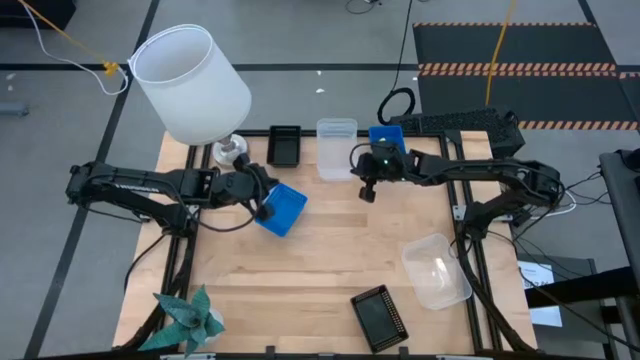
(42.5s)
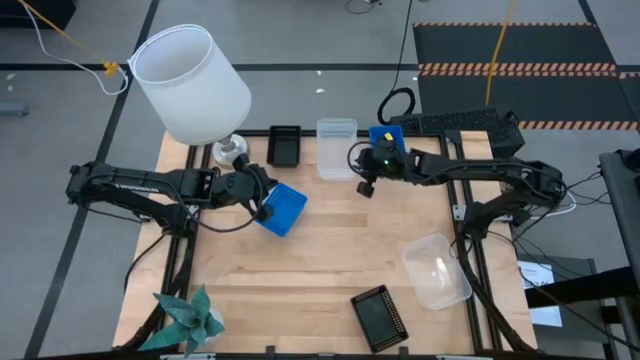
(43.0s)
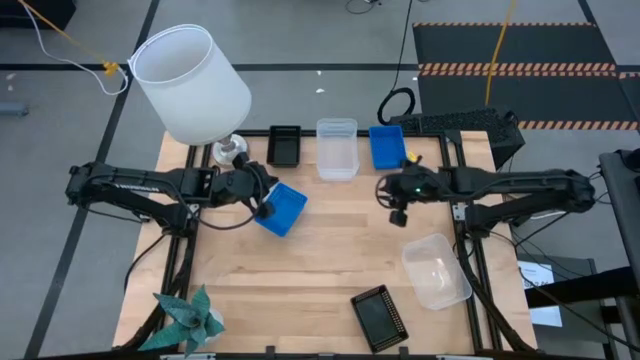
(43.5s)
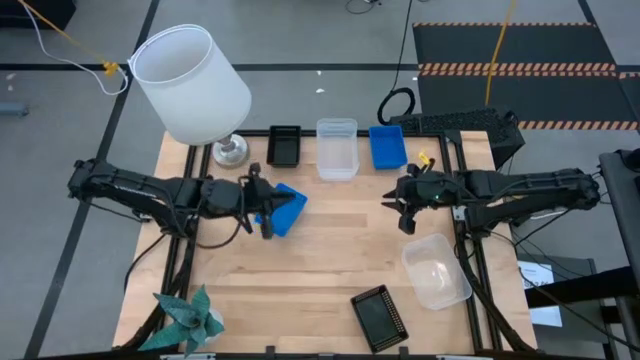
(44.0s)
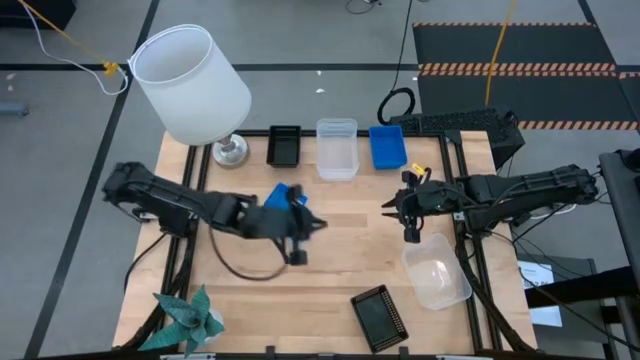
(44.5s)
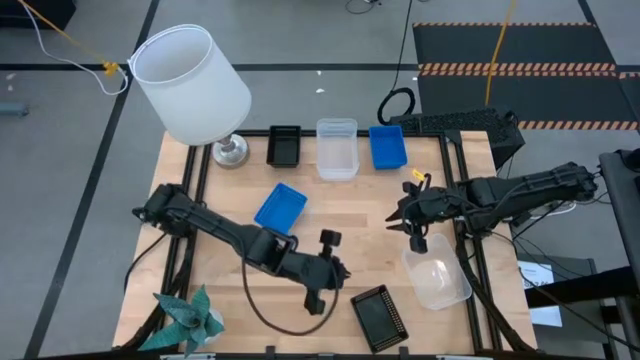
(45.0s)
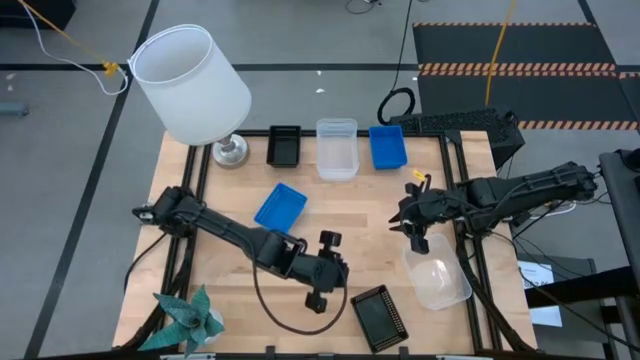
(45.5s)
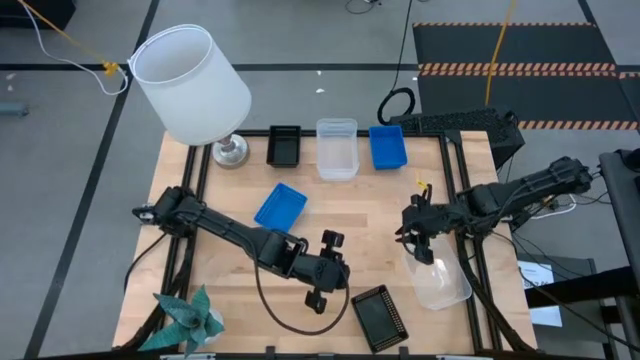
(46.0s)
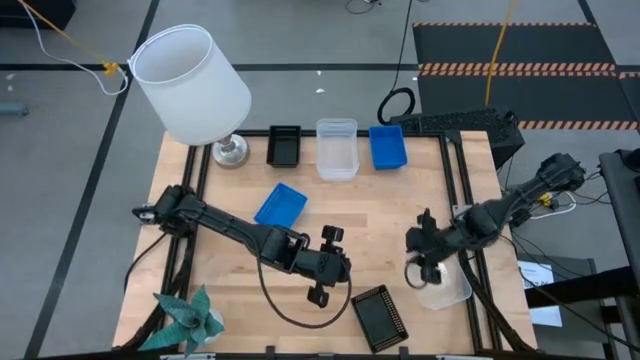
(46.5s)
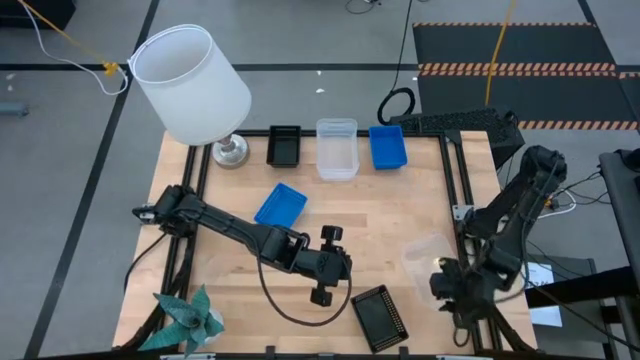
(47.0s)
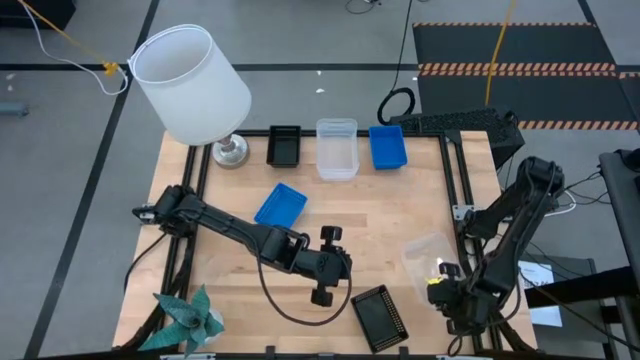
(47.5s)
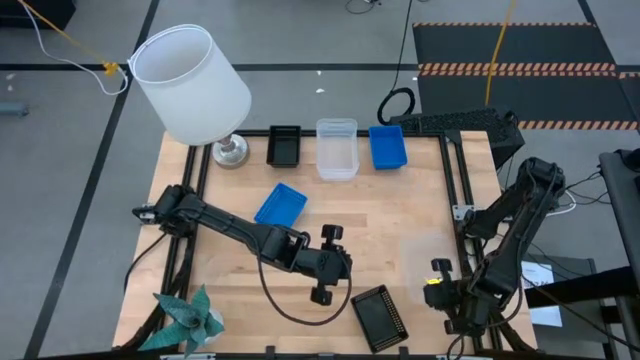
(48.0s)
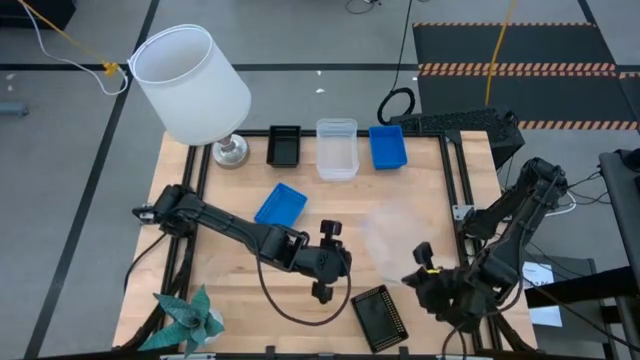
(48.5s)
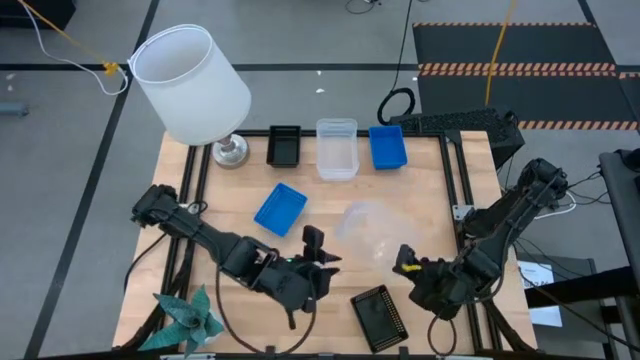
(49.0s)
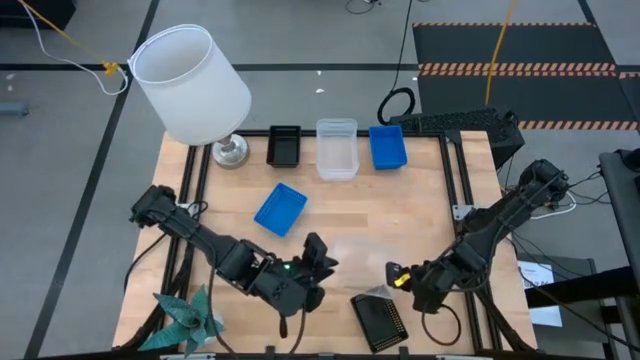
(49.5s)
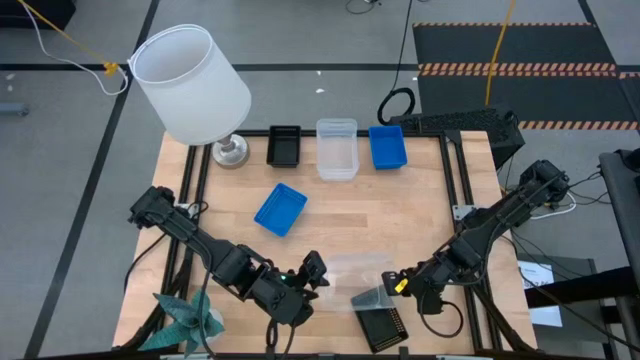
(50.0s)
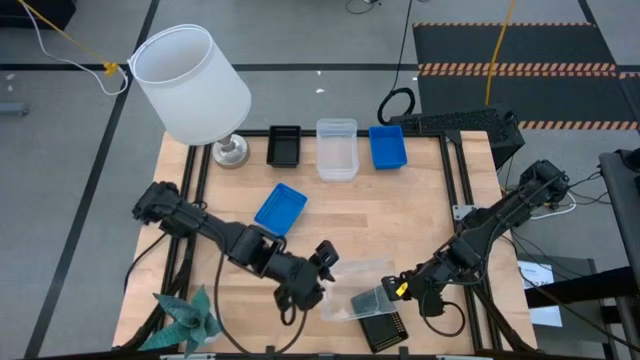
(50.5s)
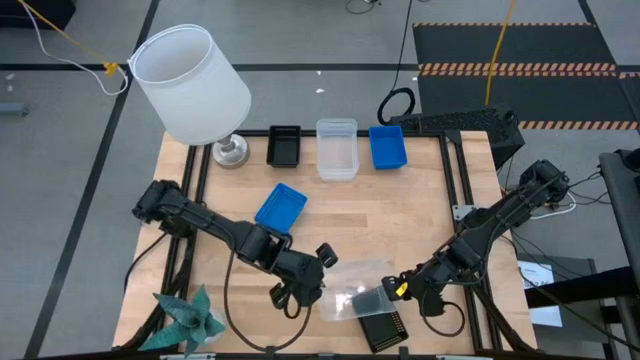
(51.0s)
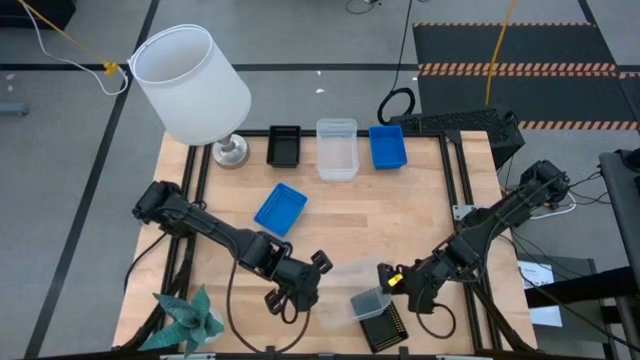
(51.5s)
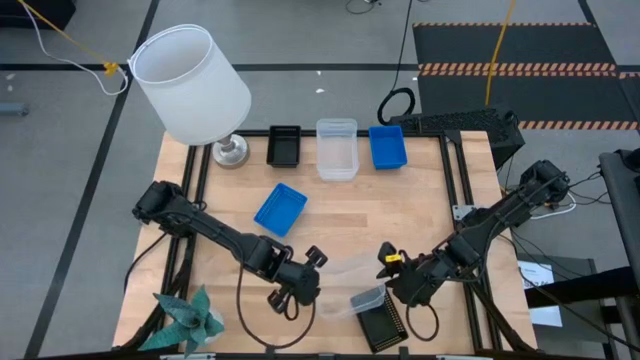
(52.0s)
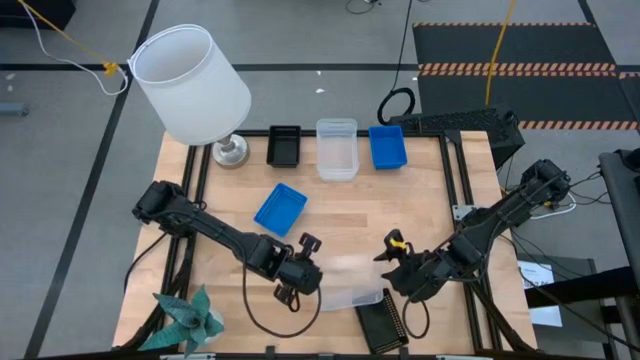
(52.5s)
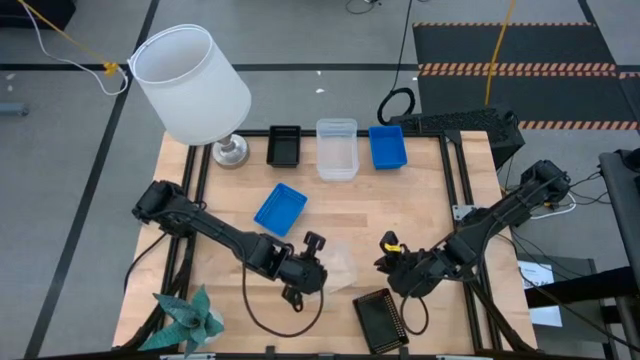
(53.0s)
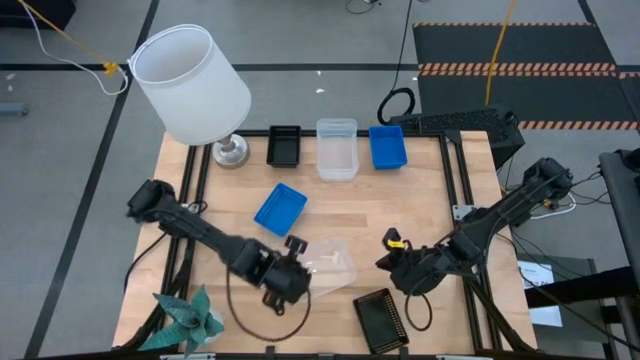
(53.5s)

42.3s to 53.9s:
Stack the bottom transparent bin on the stacked transparent bins

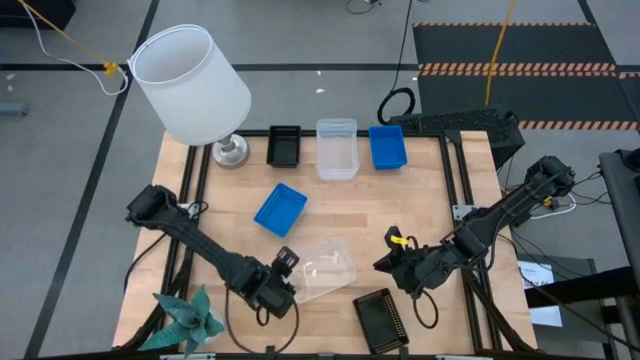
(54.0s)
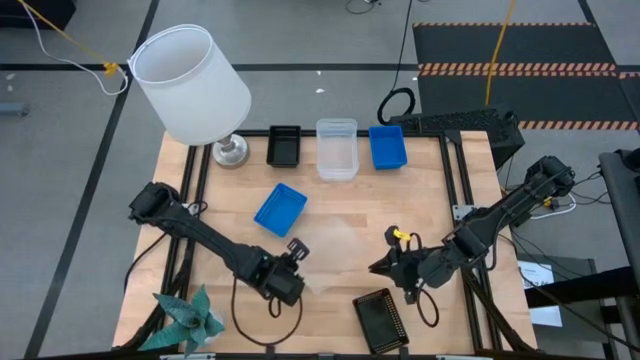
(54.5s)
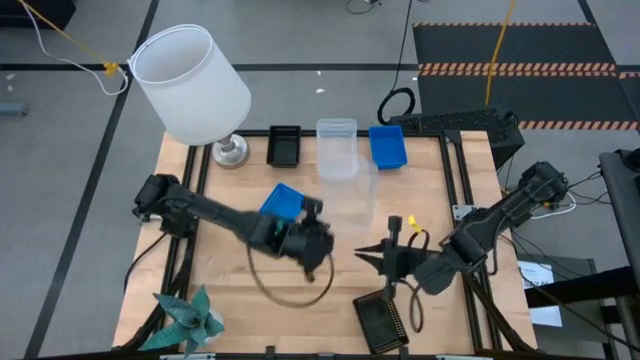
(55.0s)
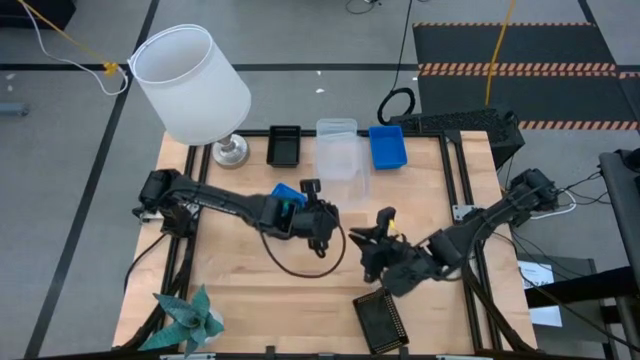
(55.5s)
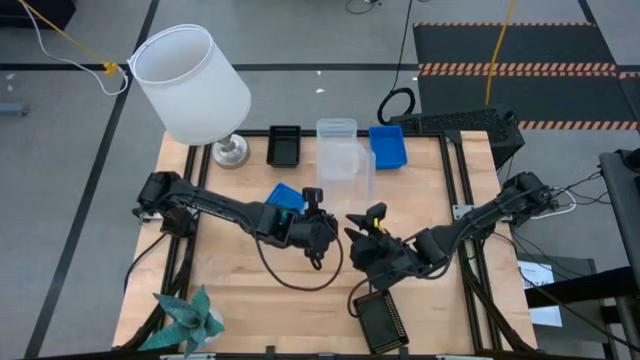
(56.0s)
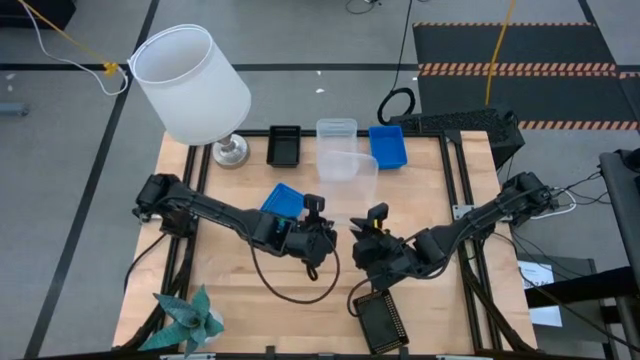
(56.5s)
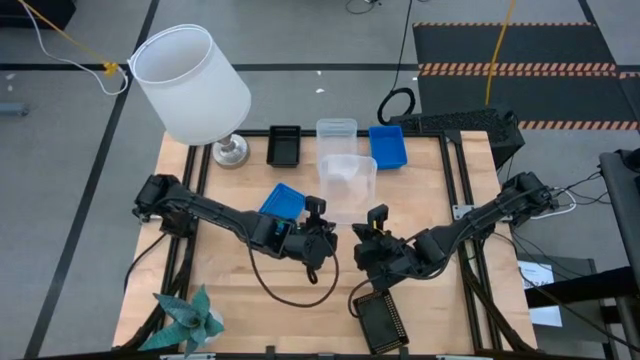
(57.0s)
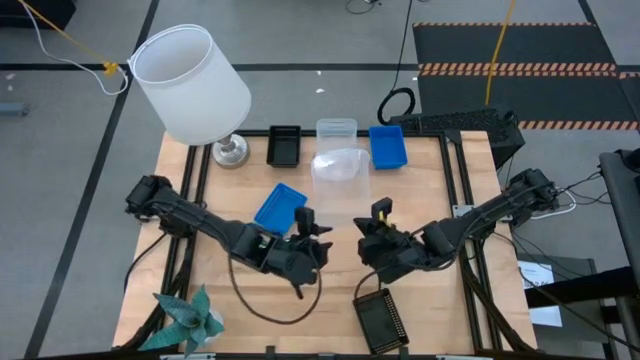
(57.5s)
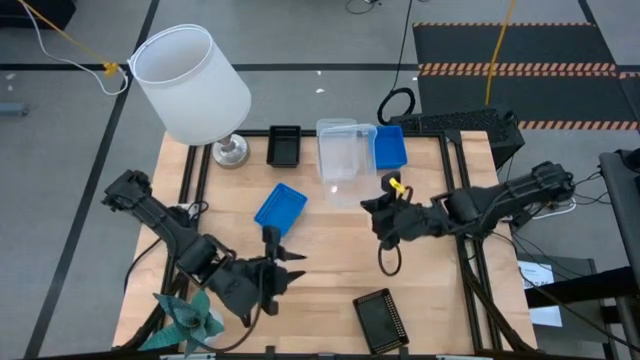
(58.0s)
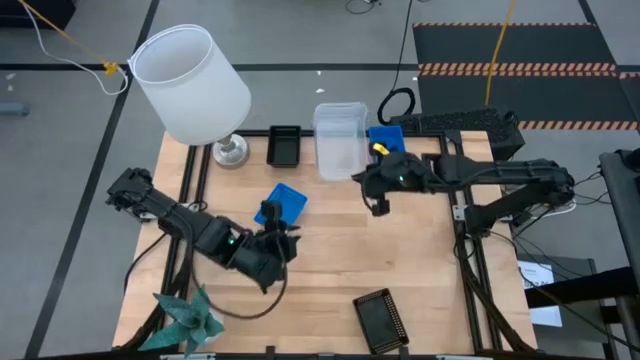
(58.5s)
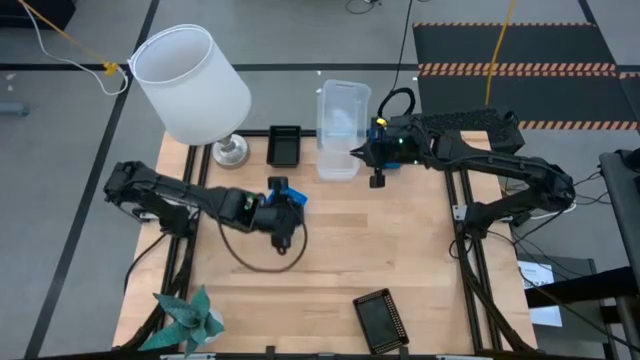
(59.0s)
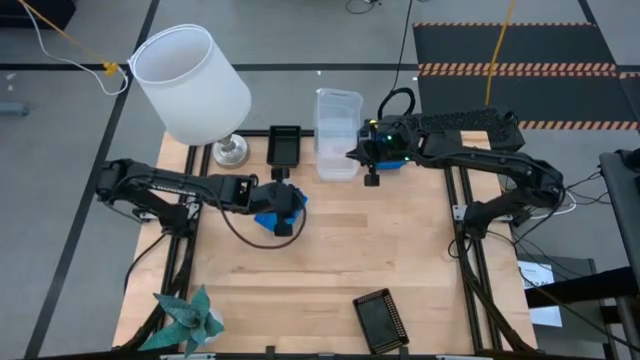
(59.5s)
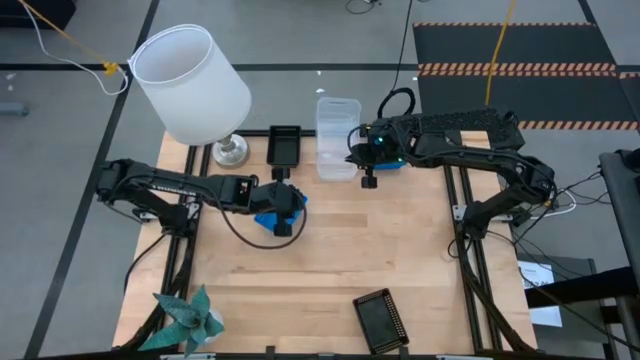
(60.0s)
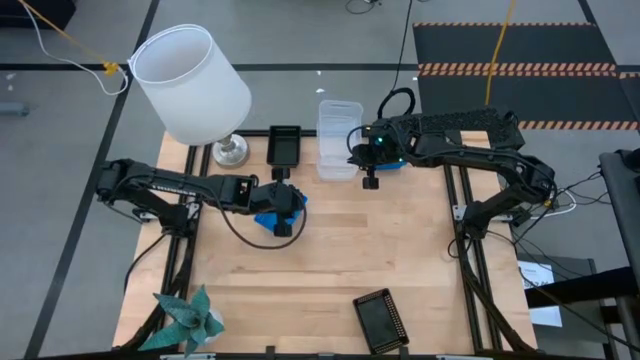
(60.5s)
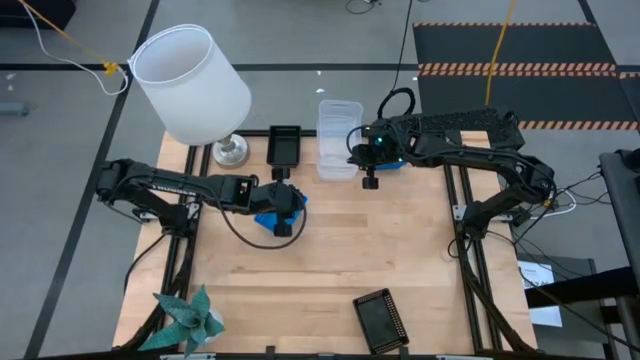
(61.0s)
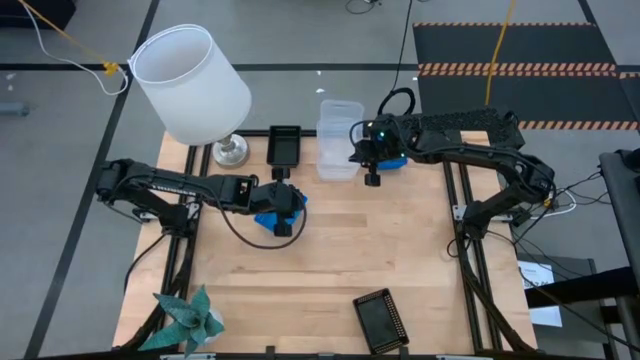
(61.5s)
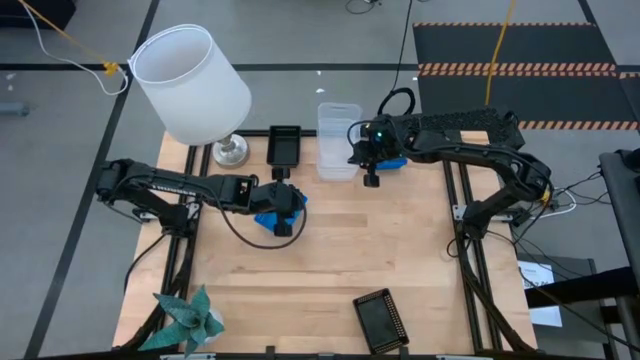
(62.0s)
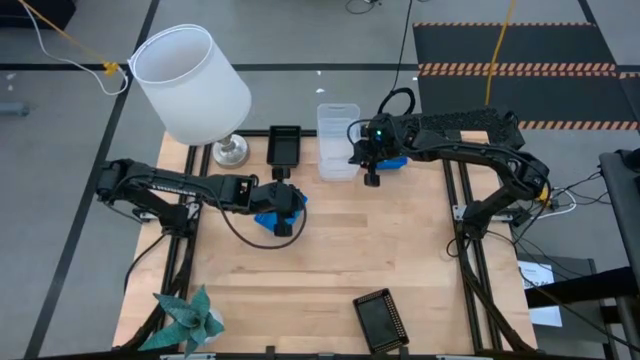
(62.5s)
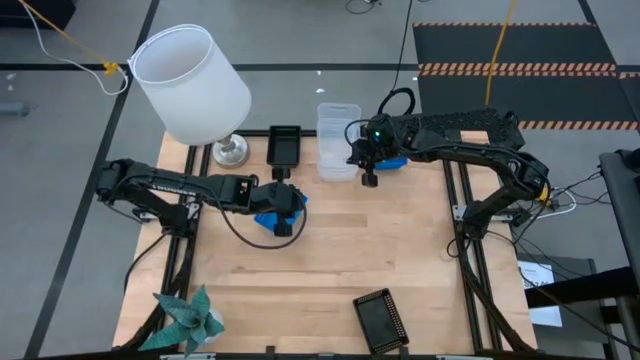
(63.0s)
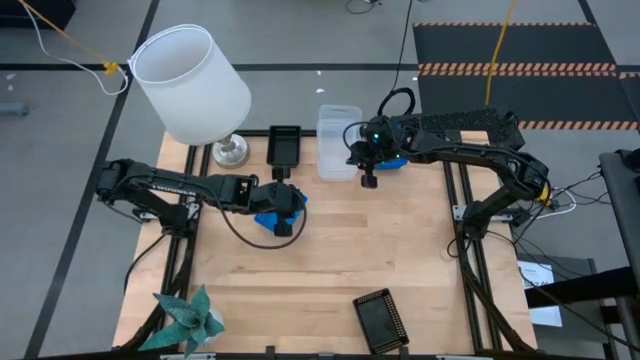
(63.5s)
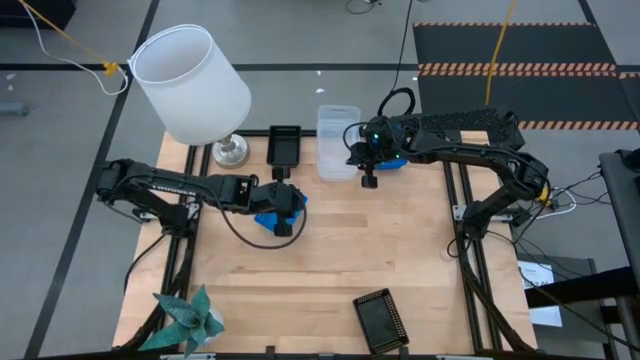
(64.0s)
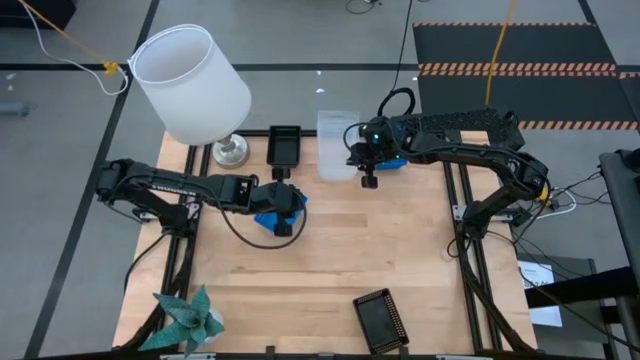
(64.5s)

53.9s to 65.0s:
Stack the bottom transparent bin on the stacked transparent bins
